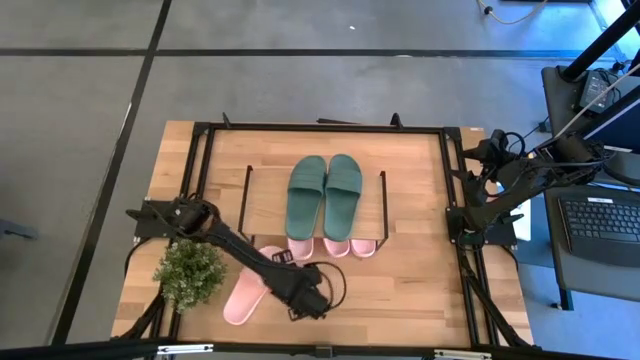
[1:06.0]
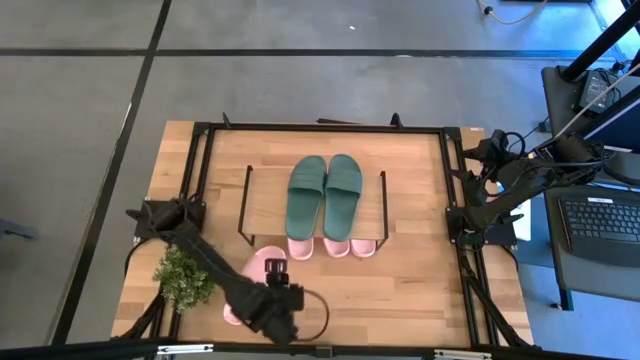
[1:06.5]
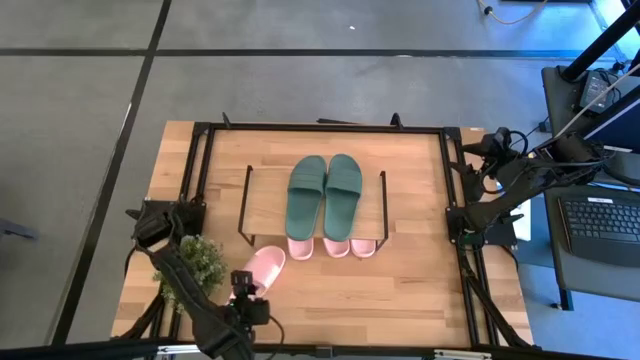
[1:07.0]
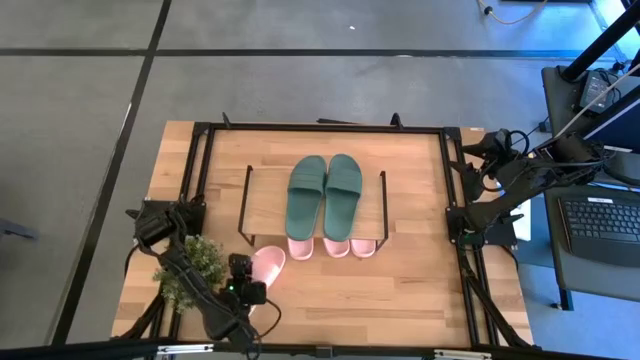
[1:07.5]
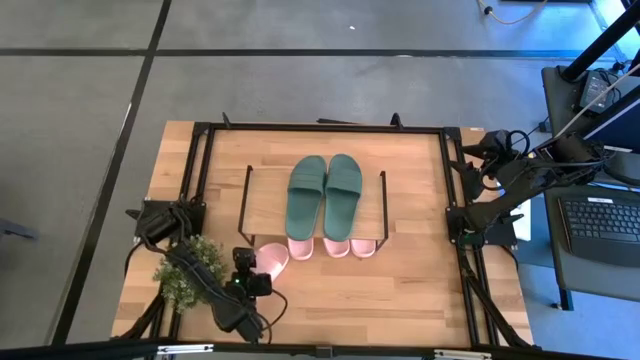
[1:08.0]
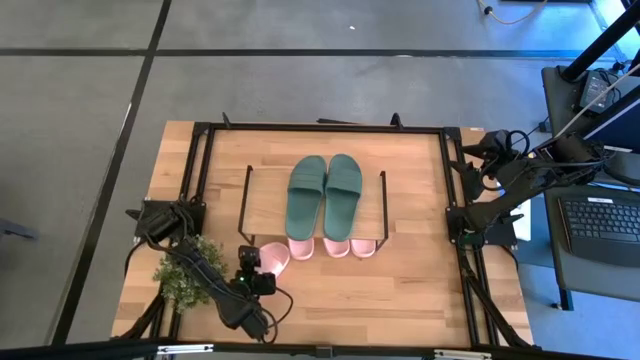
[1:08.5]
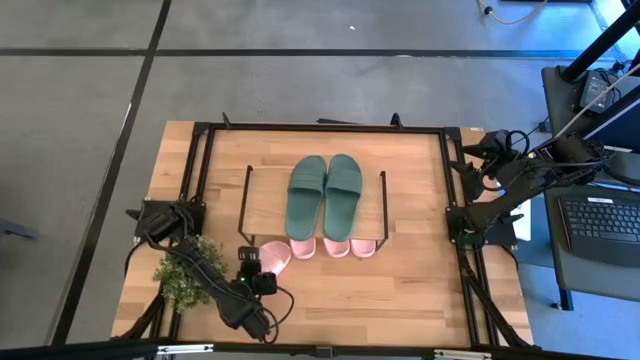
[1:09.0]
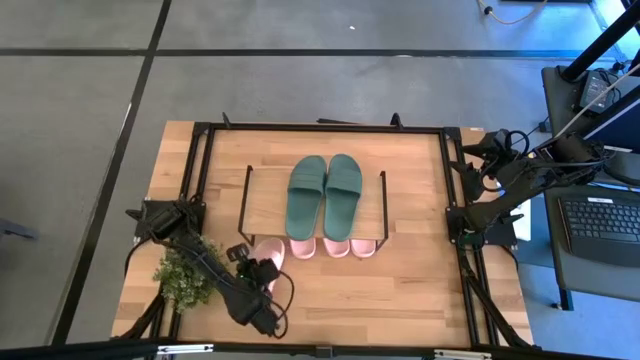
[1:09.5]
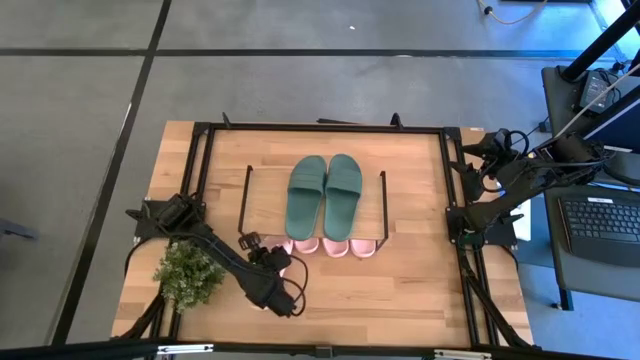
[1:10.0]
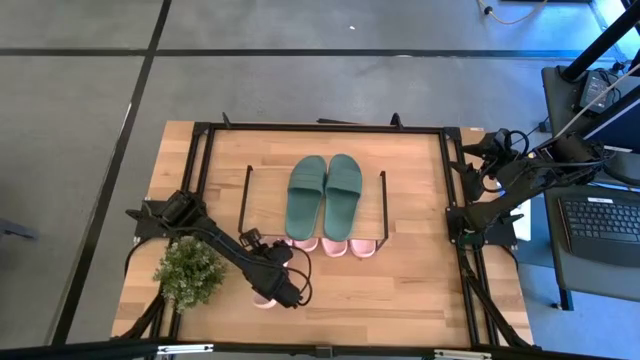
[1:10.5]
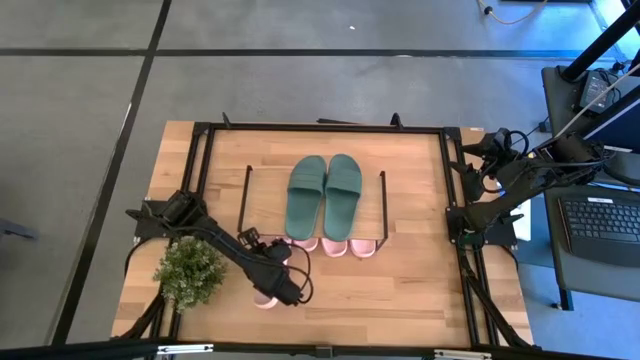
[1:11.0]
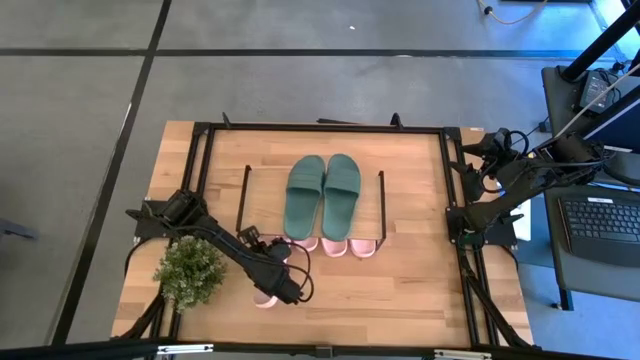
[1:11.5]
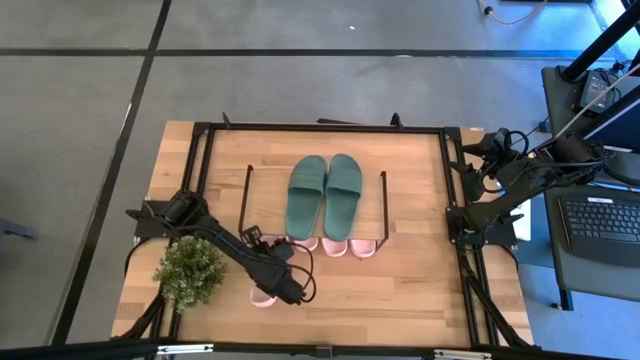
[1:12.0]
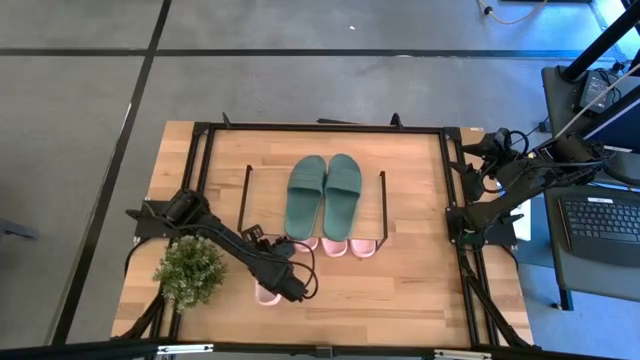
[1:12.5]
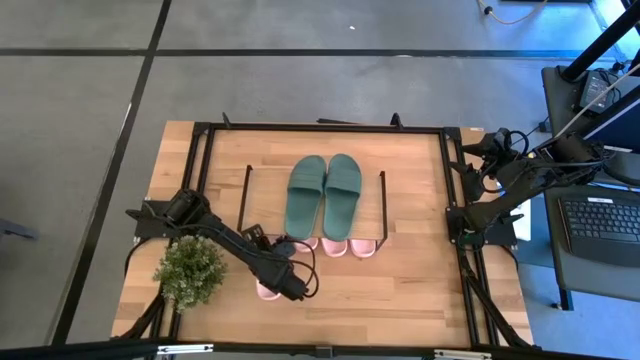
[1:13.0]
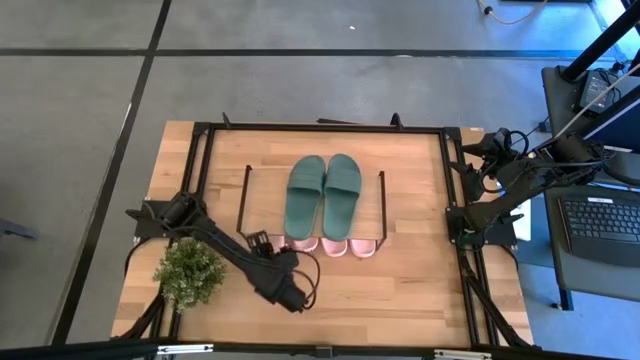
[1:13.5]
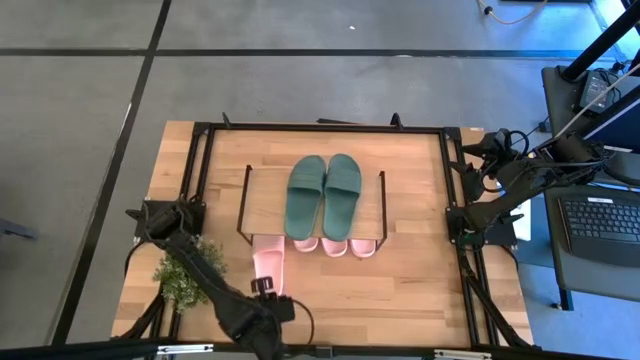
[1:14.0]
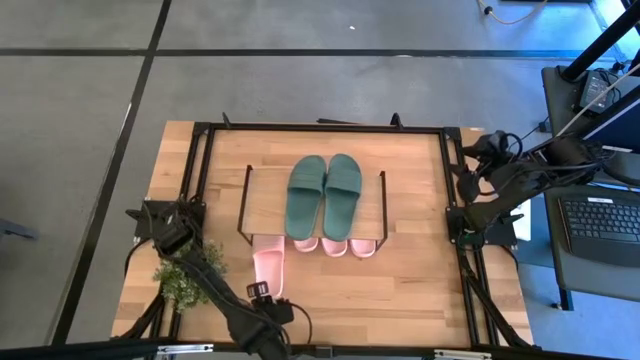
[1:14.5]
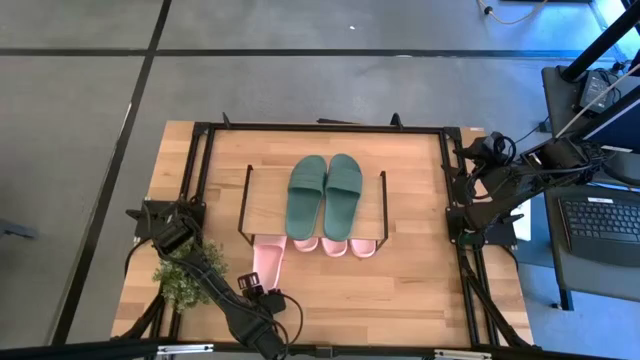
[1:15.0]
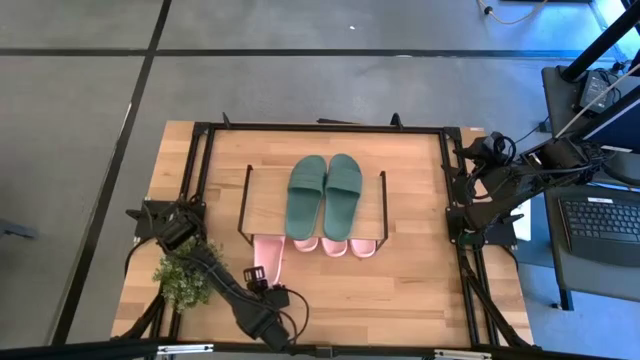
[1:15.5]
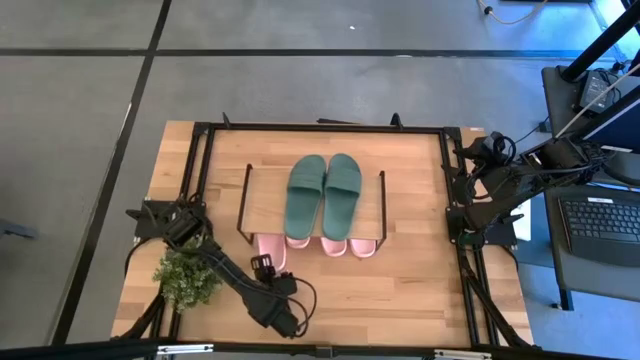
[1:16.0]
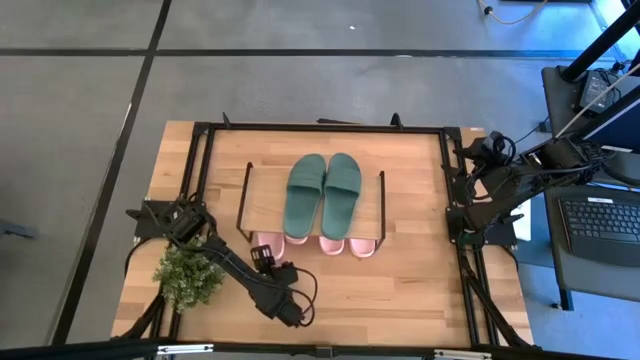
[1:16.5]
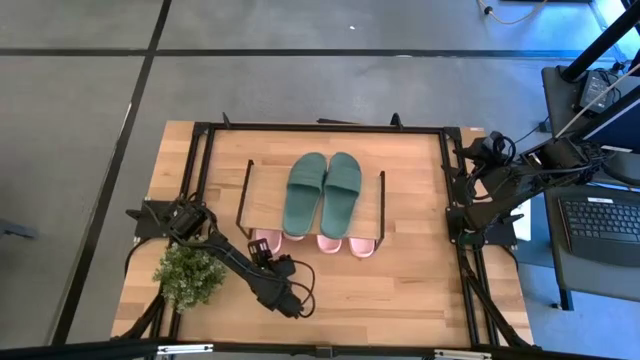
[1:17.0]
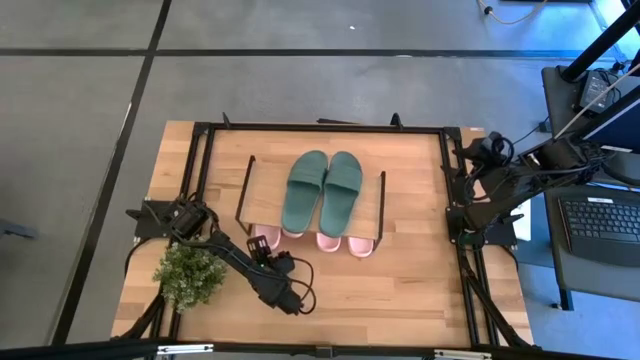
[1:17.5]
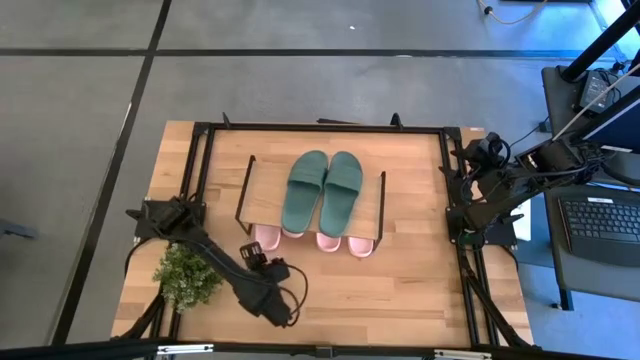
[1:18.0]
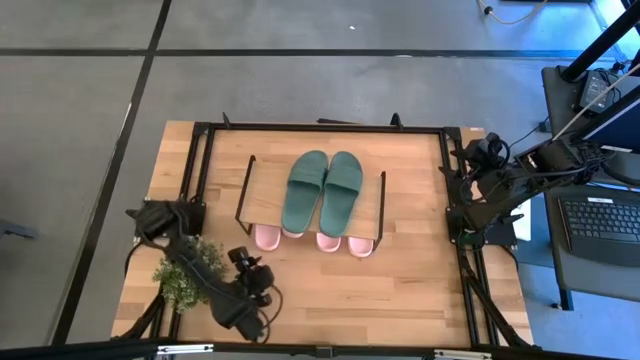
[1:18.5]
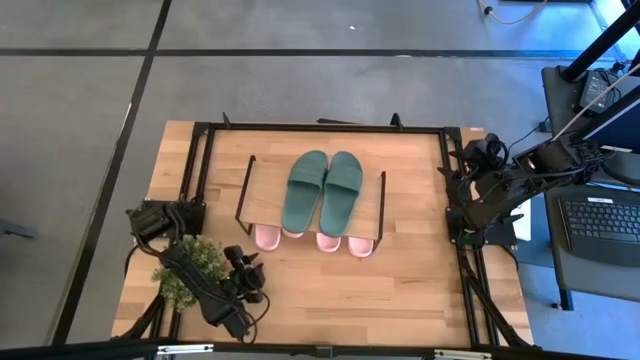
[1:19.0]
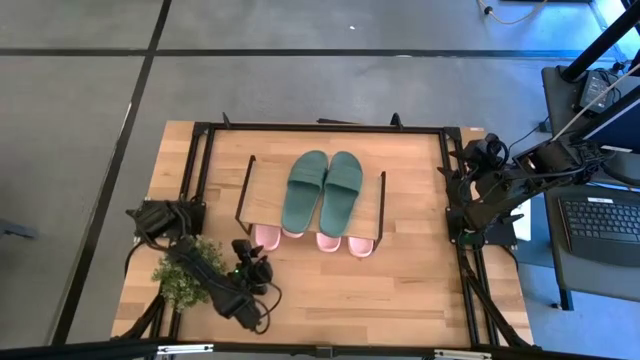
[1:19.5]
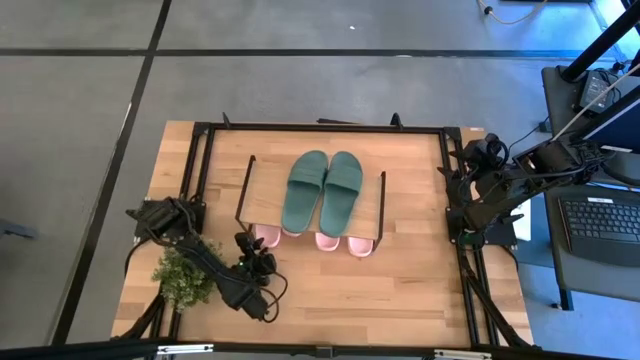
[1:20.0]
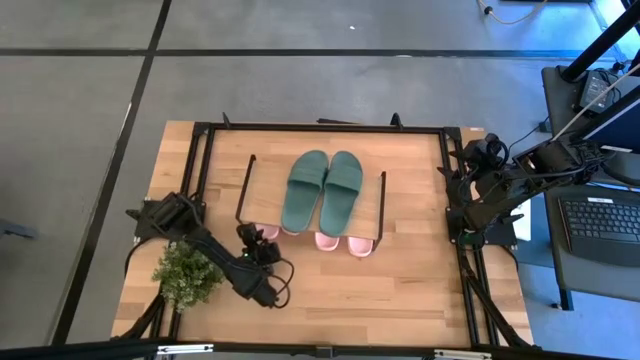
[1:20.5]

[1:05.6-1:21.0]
Task: Pick and place slides into the shelf
Put the pink slide under the shelf

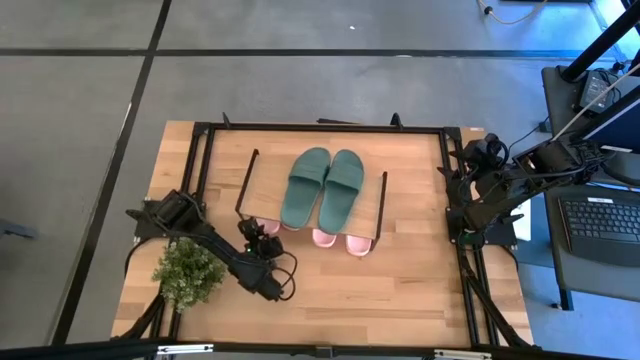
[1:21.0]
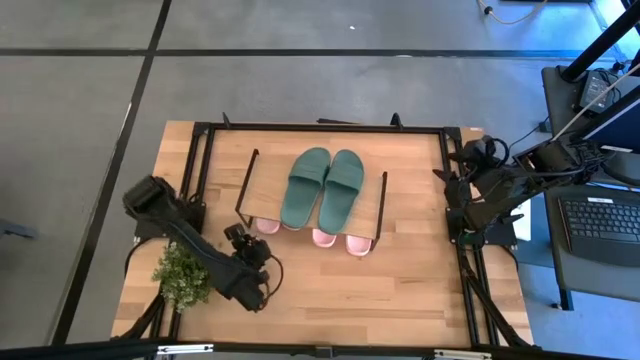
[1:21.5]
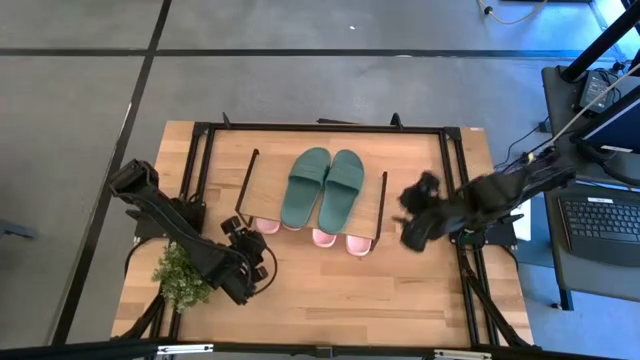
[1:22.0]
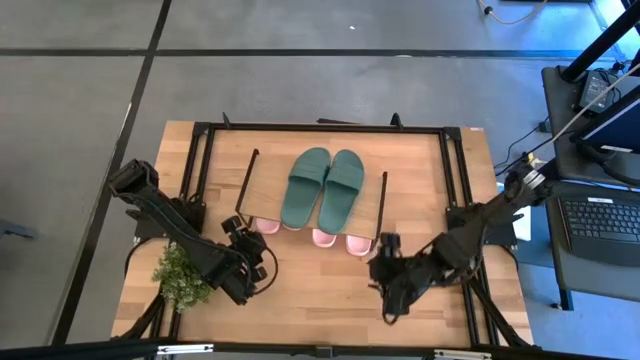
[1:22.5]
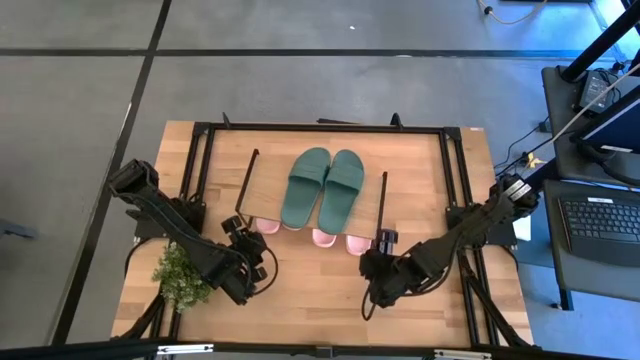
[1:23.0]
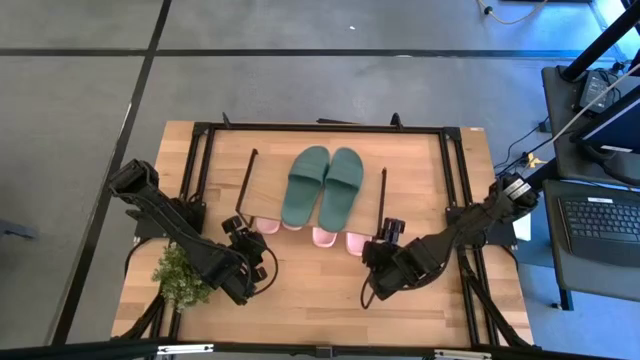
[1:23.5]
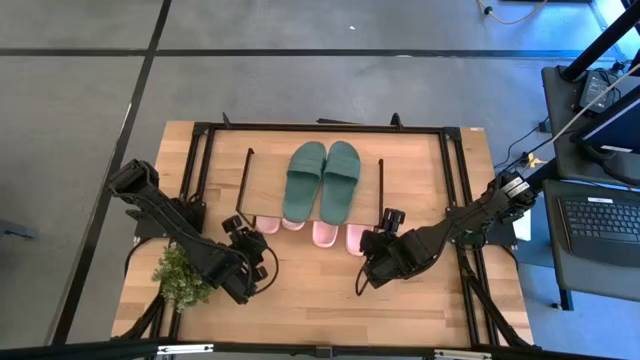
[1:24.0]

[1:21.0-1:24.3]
Adjust the shelf

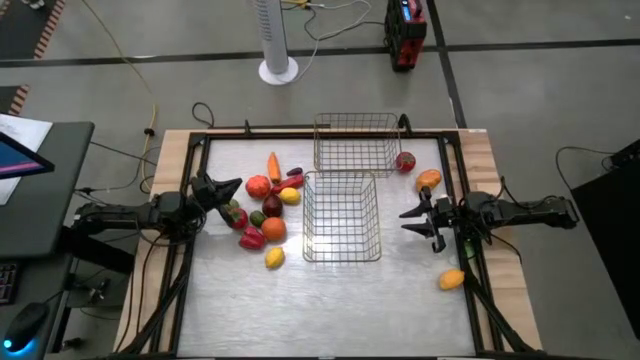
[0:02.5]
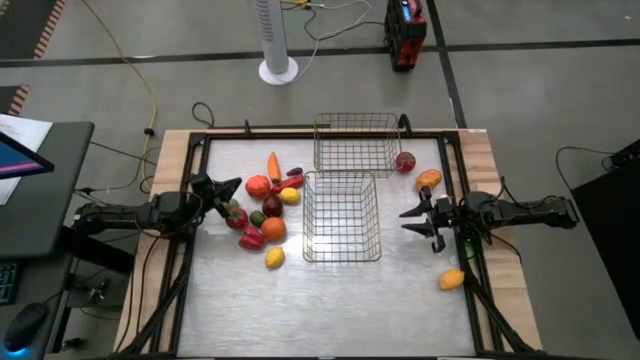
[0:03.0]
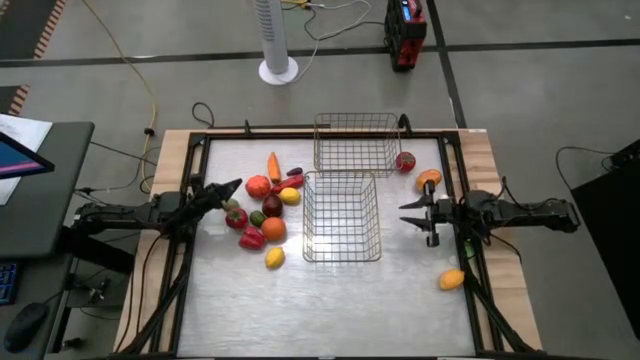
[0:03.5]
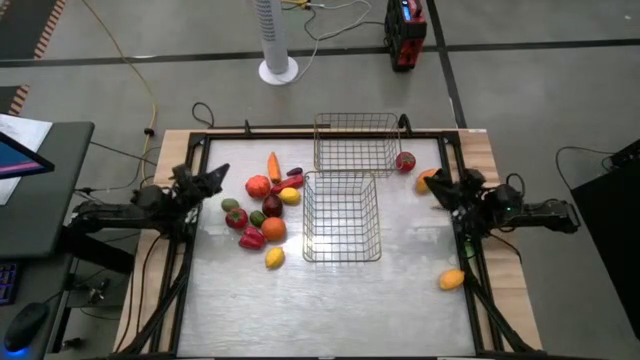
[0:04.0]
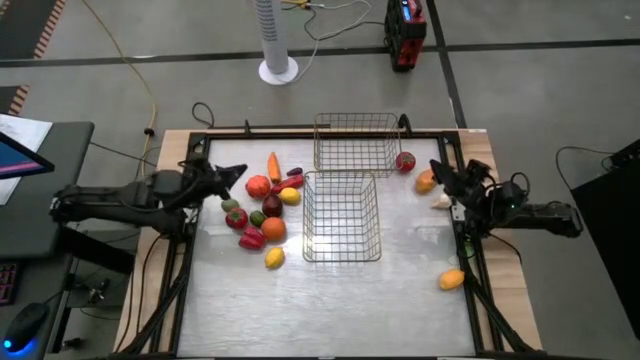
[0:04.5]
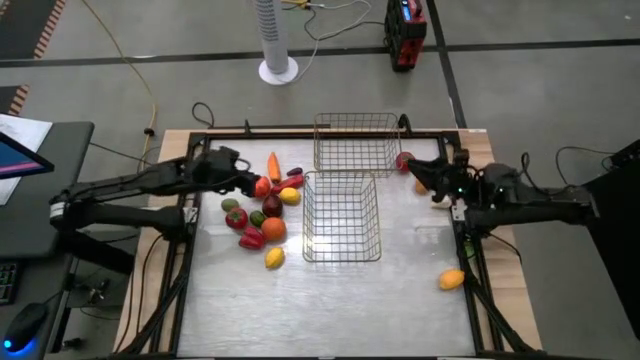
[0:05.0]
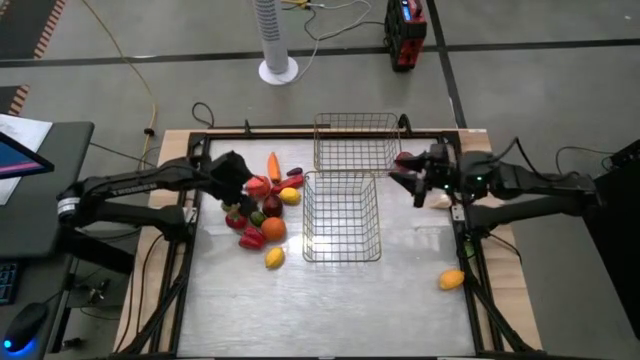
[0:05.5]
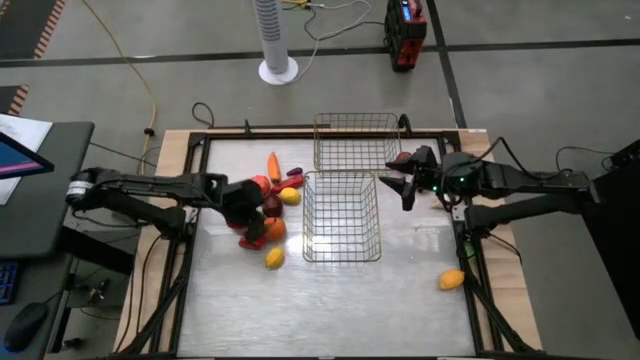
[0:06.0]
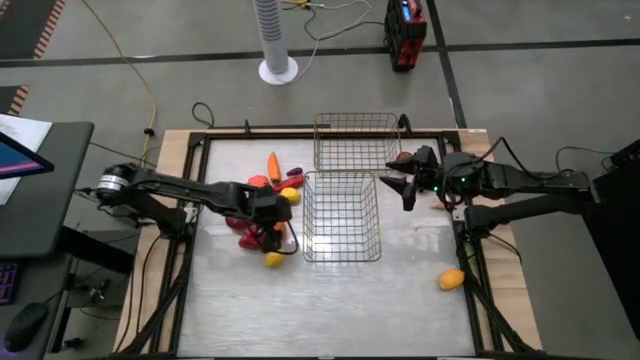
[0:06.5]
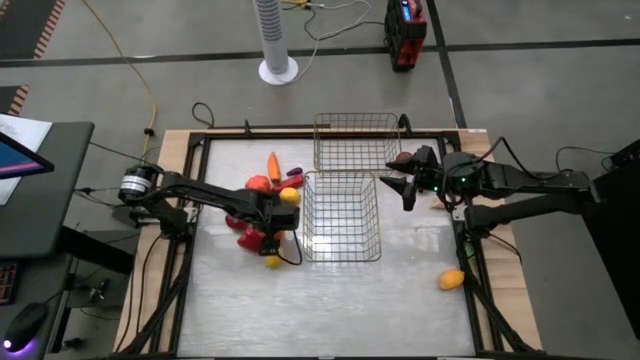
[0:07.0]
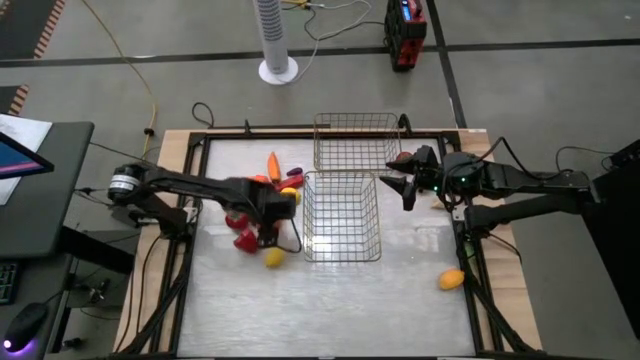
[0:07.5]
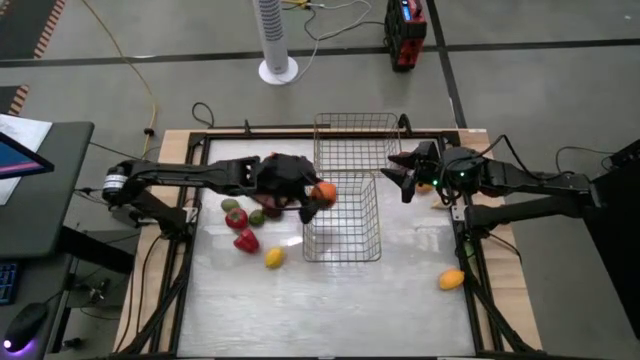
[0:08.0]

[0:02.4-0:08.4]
Task: Sort produce into baskets
Put the orange into the bottom wire basket
